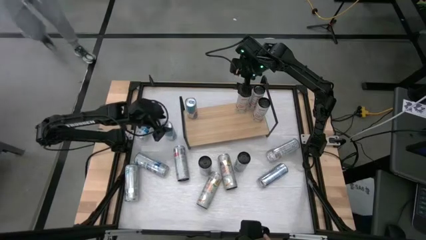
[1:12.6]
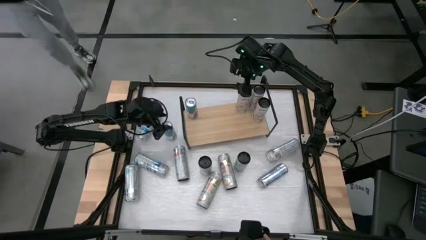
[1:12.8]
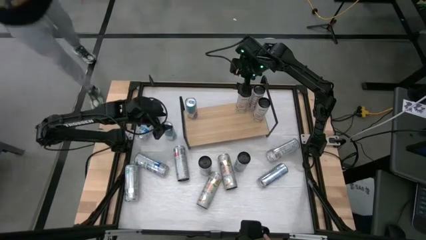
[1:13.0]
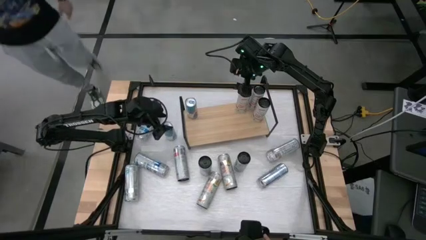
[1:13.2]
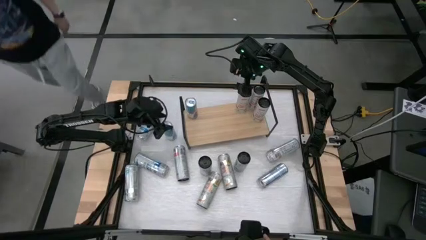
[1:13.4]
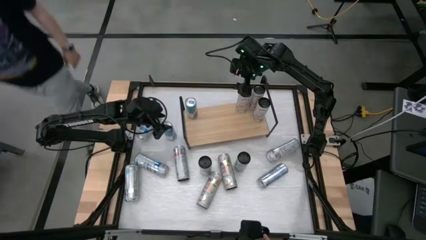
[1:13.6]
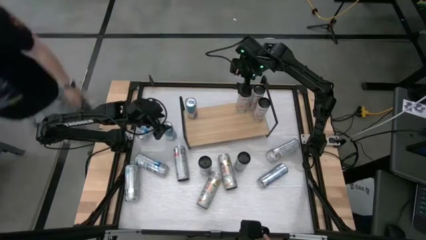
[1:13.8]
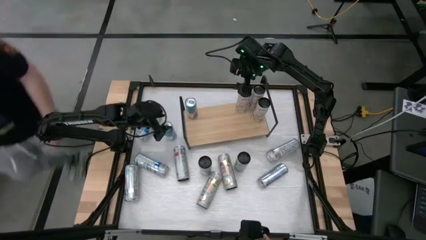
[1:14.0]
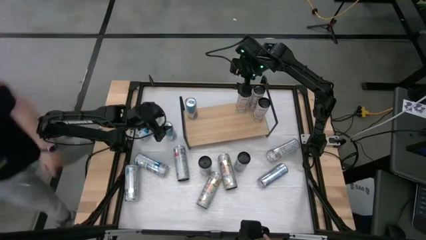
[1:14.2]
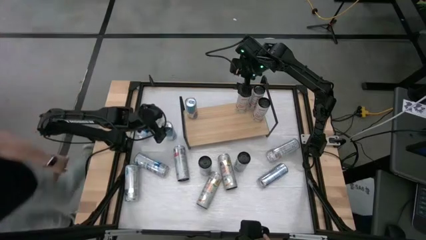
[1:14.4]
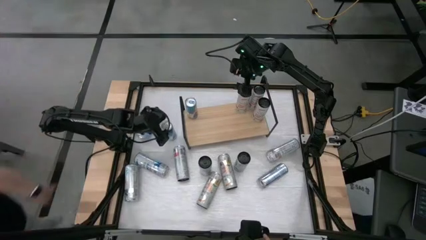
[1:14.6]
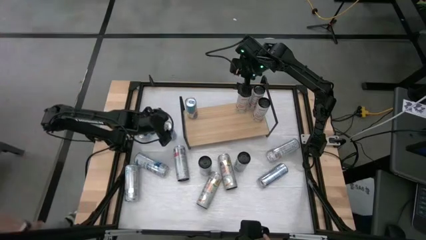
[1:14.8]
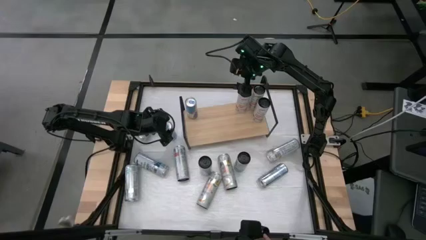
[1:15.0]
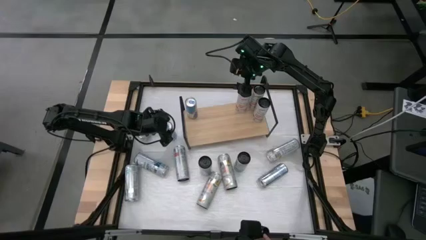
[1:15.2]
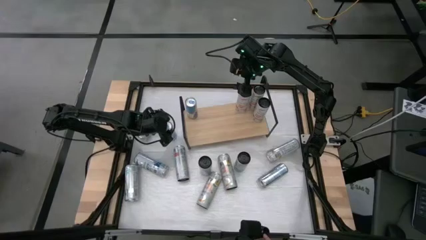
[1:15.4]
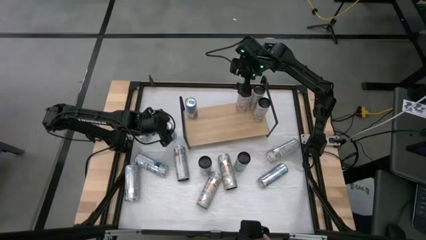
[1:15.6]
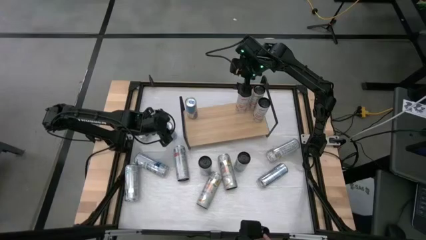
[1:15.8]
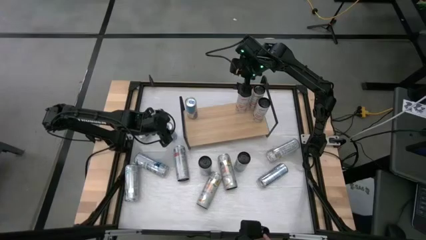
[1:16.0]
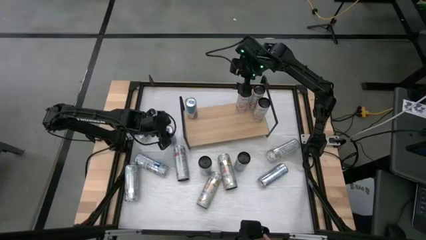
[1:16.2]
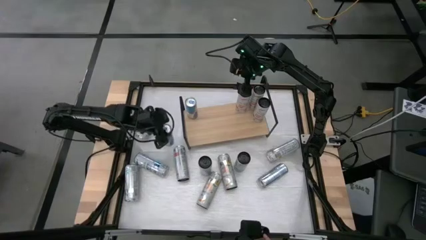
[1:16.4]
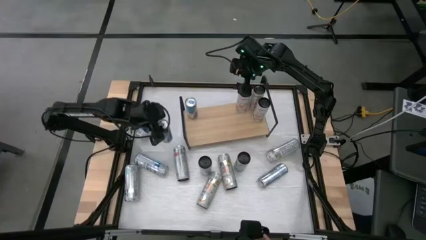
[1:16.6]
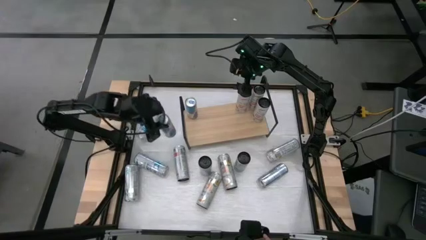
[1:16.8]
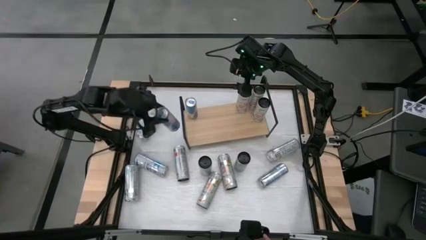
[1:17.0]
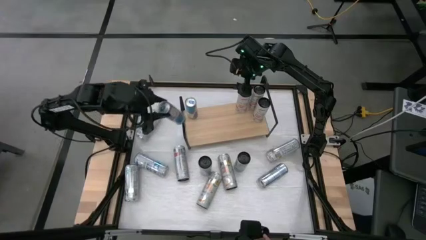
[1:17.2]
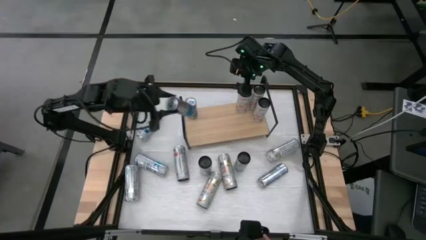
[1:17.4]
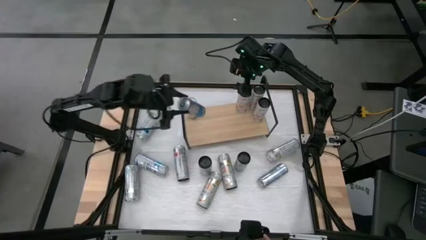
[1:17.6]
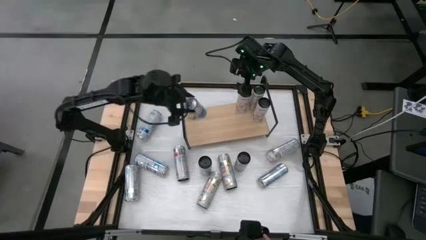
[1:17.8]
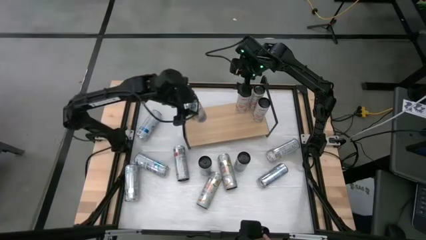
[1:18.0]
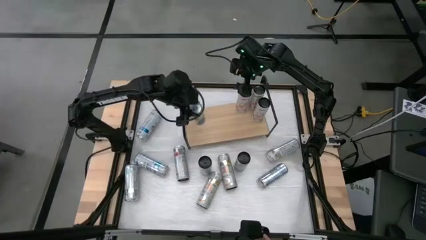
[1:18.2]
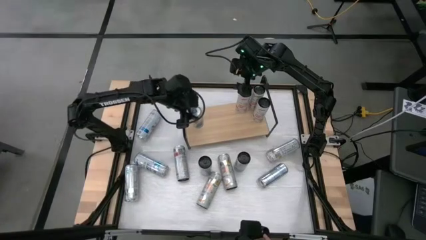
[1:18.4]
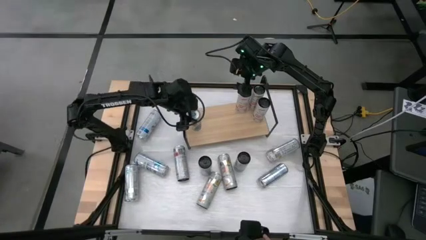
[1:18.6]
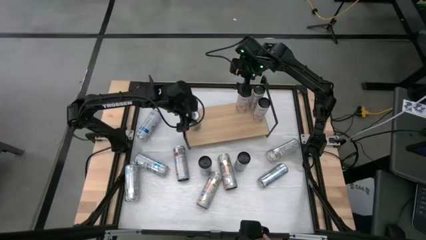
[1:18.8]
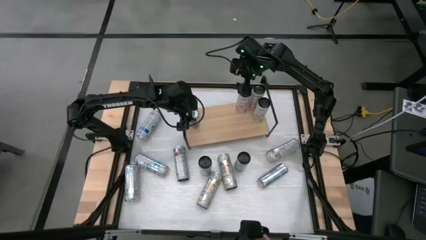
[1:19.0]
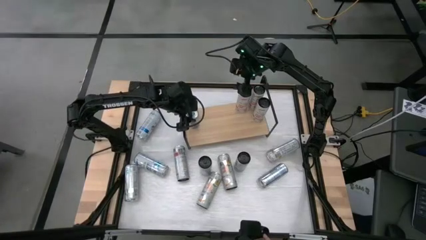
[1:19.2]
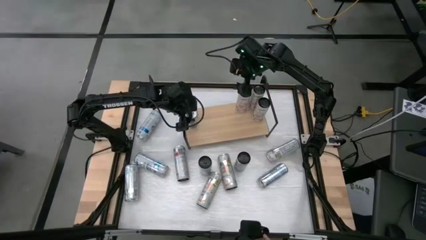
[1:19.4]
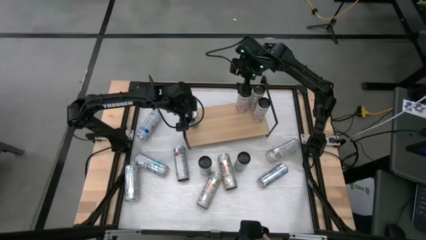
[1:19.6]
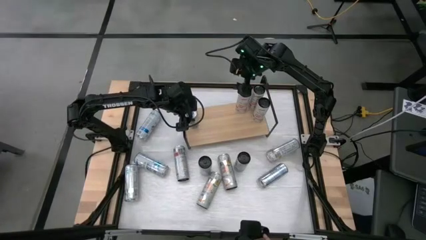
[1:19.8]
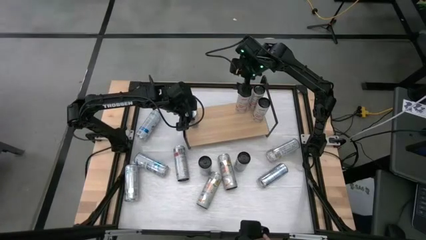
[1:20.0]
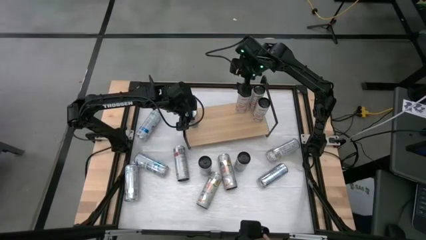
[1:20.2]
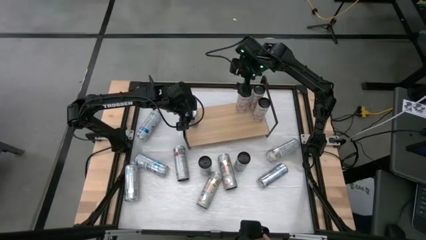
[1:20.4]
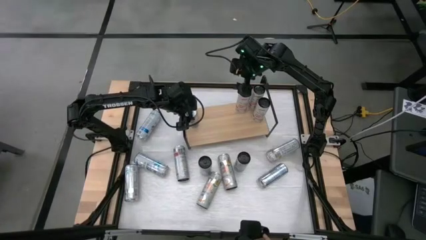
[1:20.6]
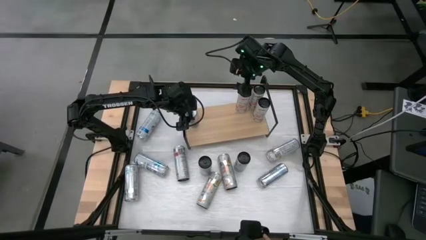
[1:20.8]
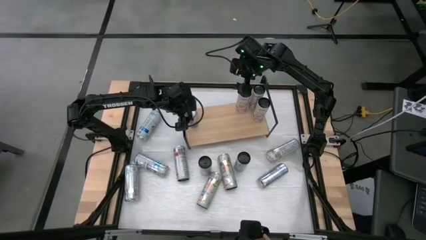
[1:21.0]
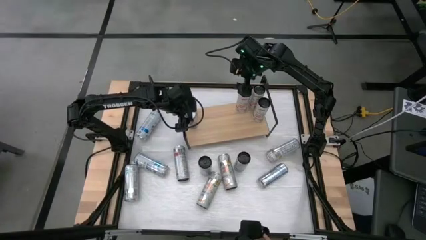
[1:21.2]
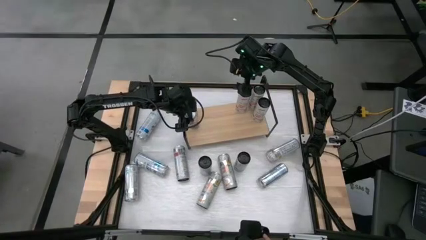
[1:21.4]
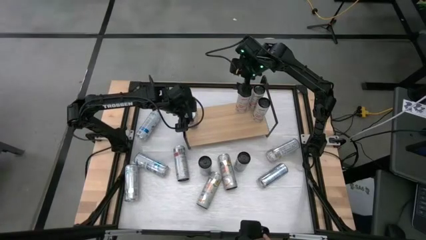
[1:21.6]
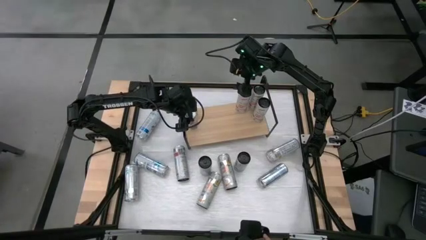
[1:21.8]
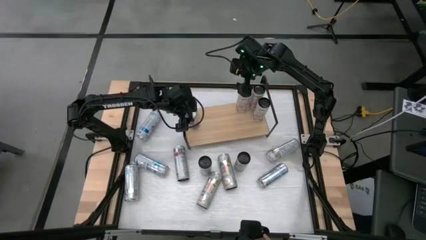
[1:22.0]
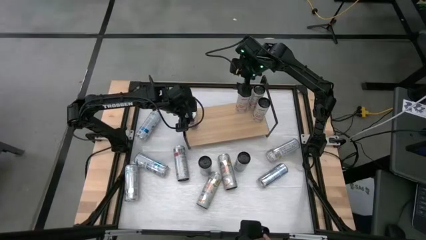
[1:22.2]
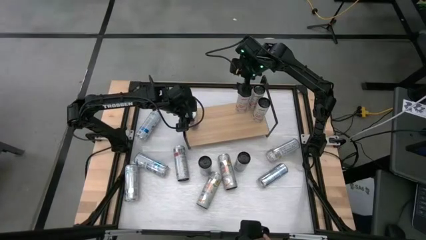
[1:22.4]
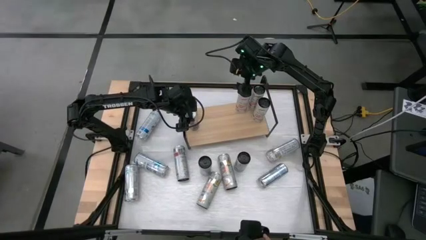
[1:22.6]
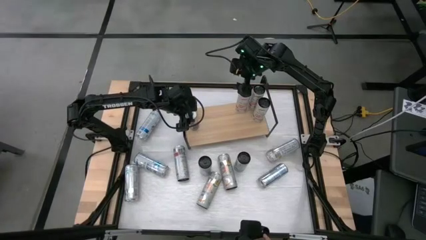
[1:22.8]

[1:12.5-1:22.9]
Task: Place canned beverage on shelf
Put the blue soda can on the shelf aligned with the other blue soda can

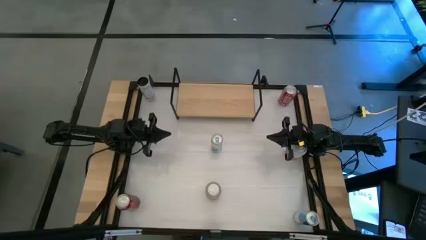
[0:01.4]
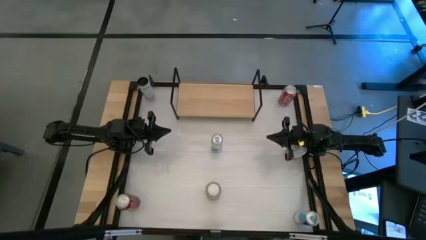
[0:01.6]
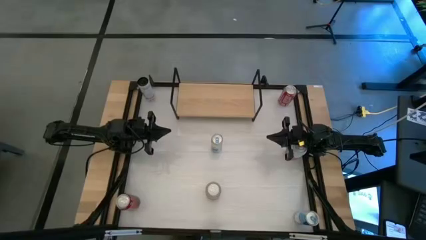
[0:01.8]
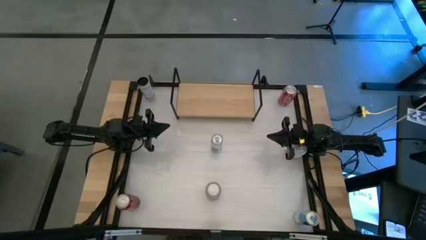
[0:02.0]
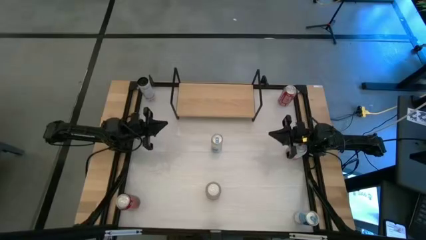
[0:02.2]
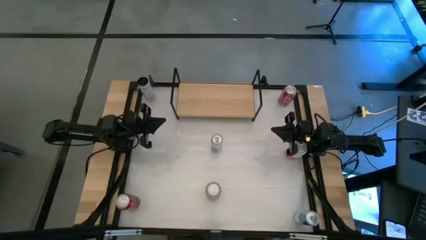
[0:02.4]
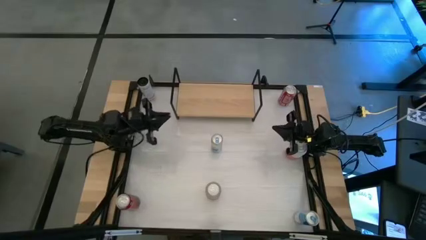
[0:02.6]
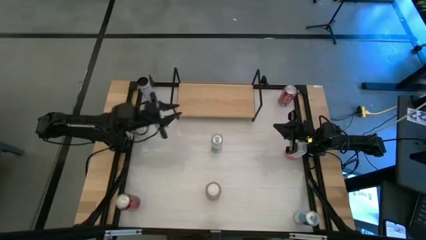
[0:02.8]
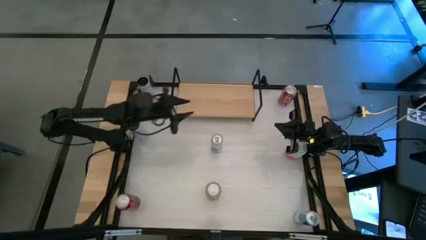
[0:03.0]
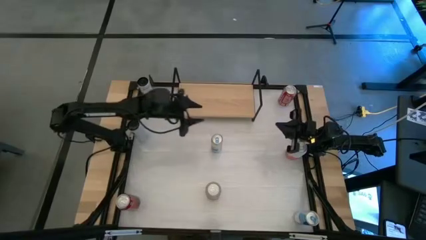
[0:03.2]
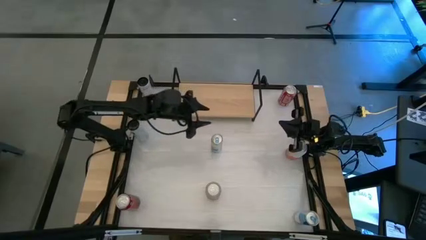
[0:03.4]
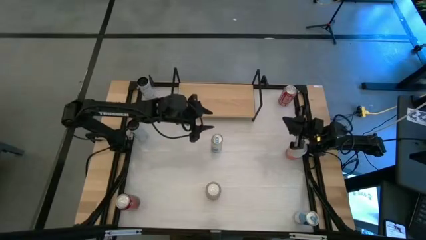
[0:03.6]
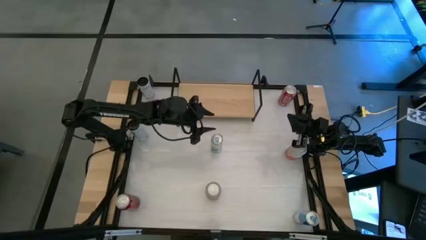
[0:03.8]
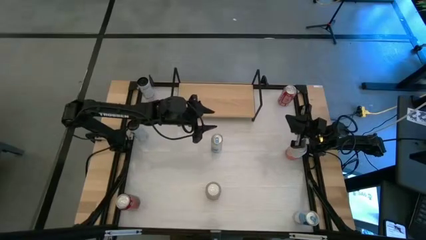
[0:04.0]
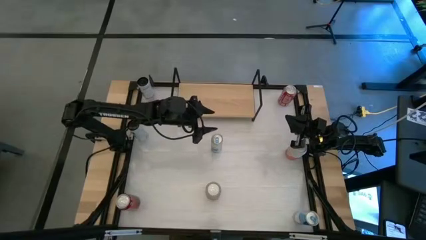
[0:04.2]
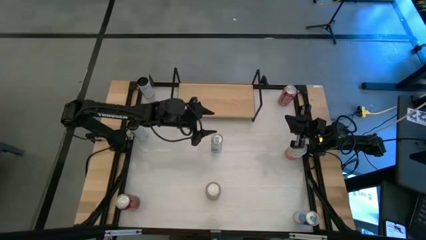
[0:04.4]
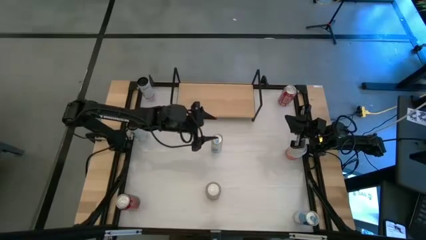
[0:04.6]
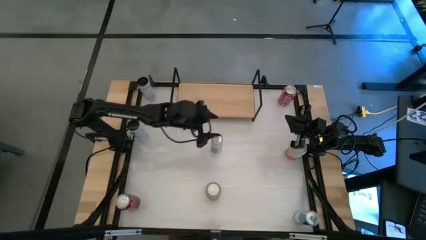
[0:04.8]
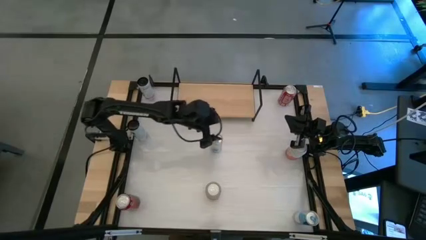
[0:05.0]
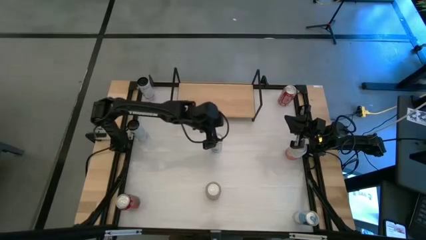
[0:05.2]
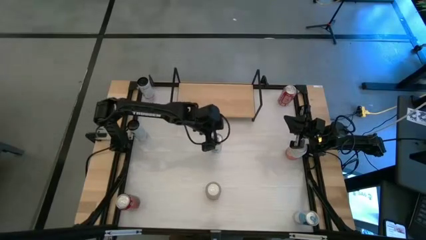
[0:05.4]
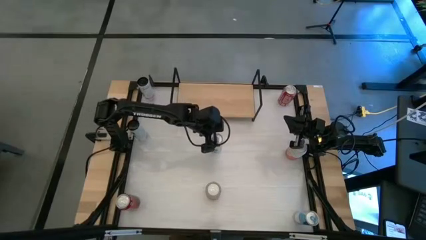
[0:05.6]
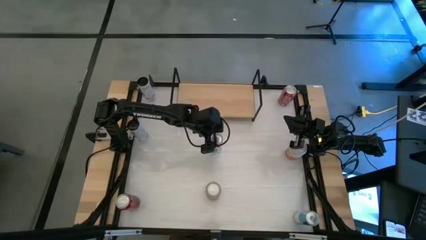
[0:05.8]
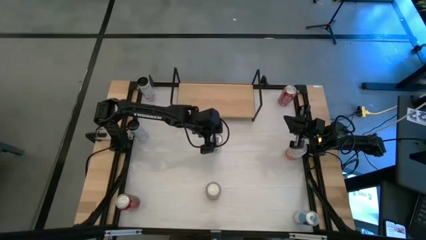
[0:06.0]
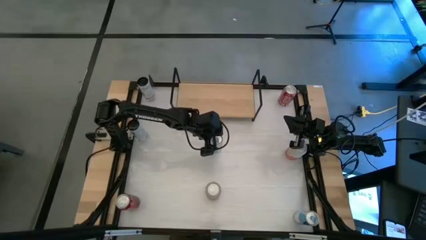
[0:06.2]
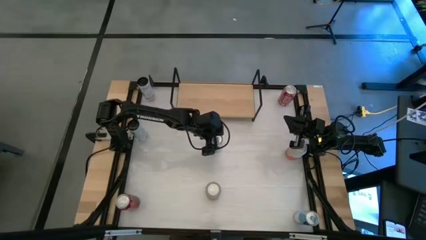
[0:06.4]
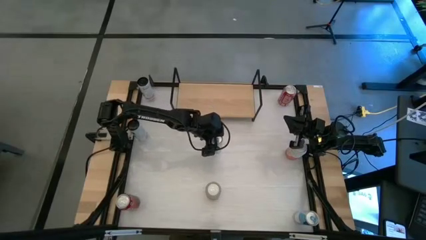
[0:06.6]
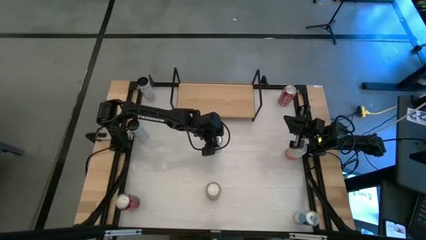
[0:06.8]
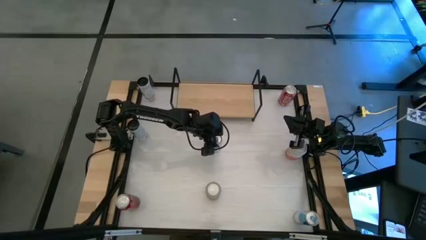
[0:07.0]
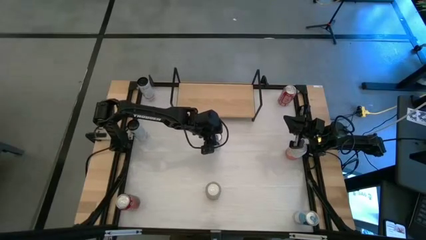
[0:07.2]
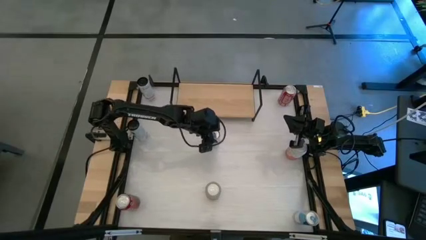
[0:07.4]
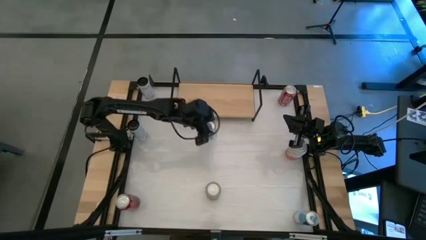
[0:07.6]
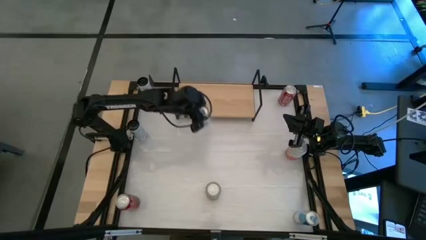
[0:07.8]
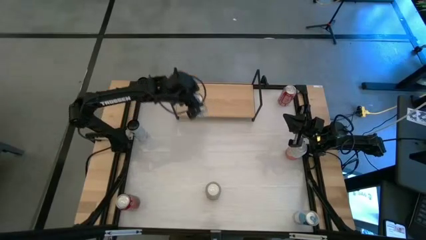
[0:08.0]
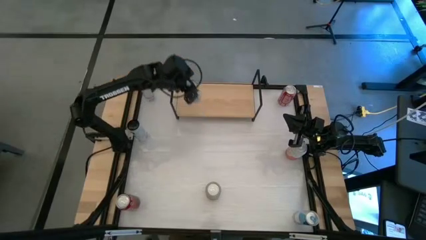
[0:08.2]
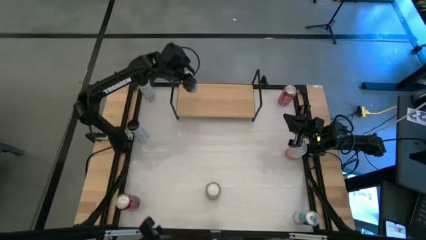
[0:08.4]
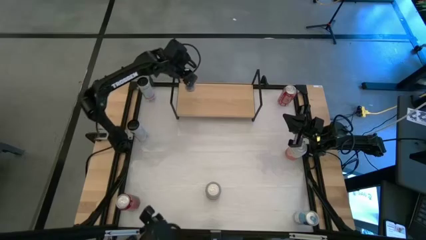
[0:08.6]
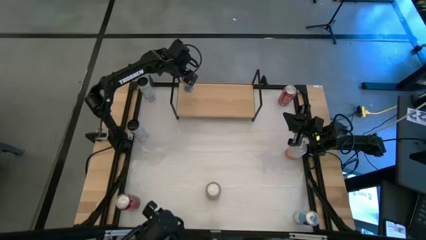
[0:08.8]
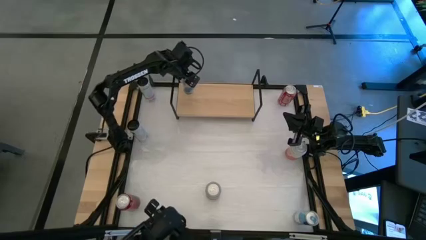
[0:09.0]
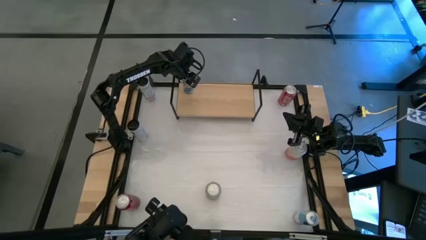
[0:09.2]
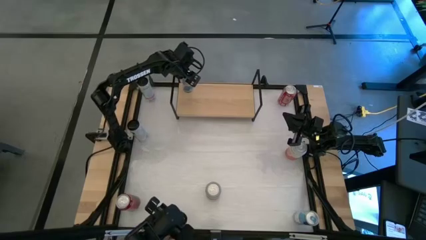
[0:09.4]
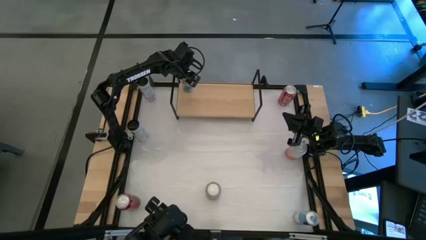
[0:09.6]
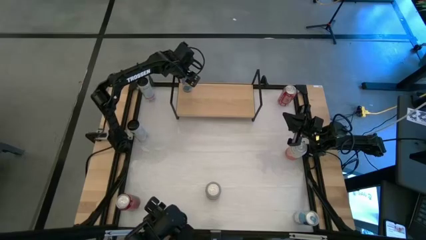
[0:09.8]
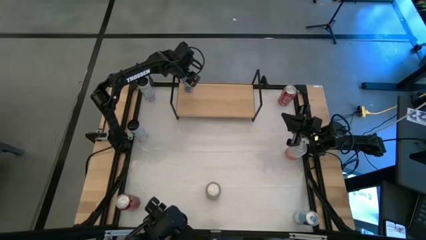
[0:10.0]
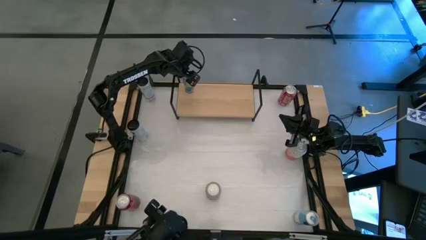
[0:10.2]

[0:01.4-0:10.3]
Task: Place canned beverage on shelf
Put the top blue soda can on the shelf
